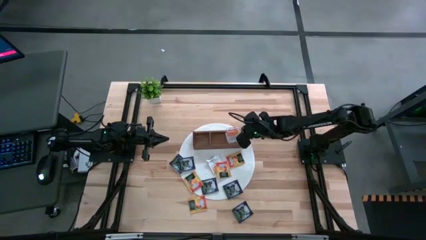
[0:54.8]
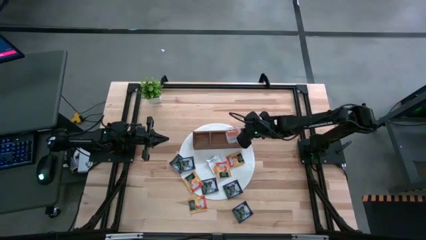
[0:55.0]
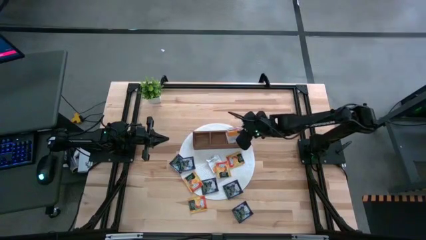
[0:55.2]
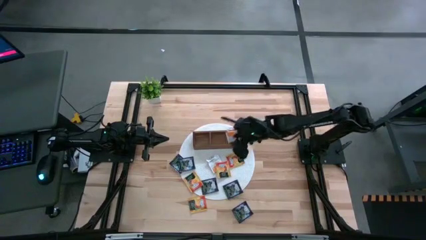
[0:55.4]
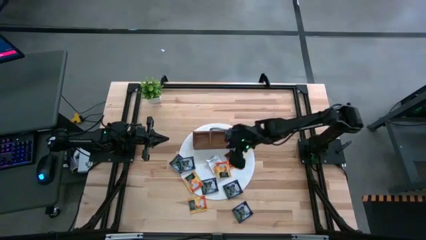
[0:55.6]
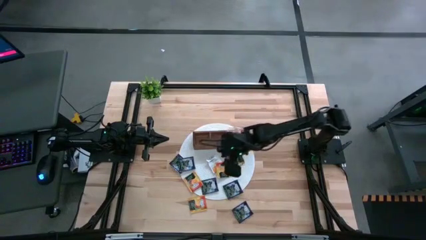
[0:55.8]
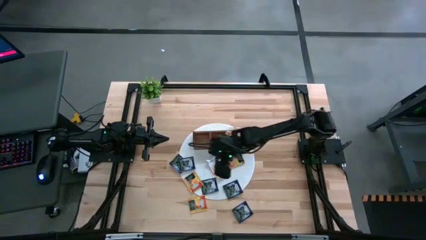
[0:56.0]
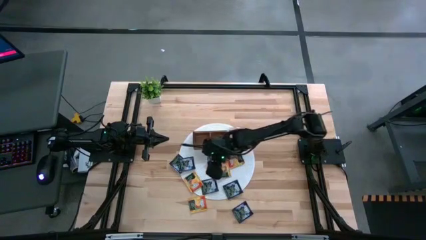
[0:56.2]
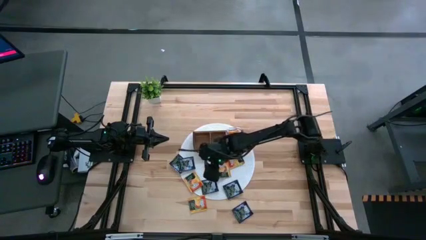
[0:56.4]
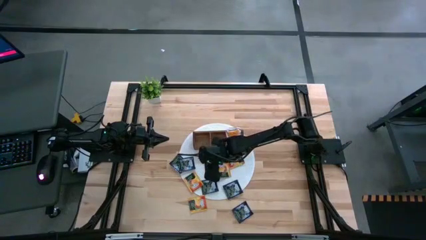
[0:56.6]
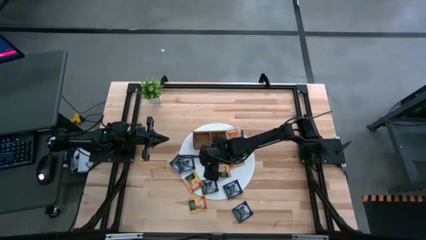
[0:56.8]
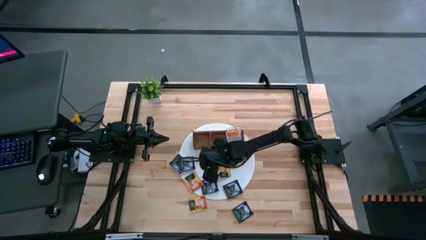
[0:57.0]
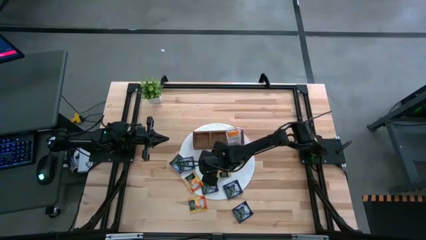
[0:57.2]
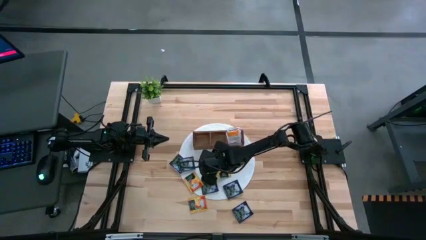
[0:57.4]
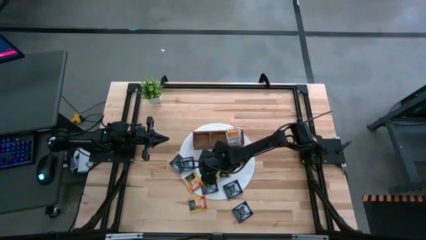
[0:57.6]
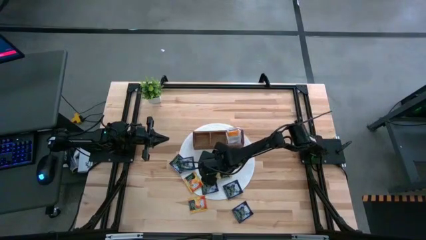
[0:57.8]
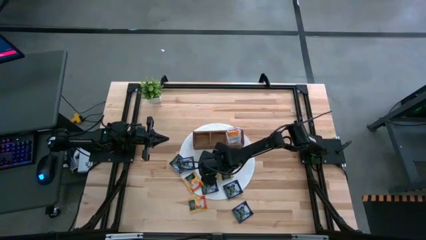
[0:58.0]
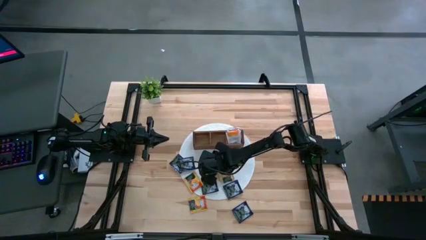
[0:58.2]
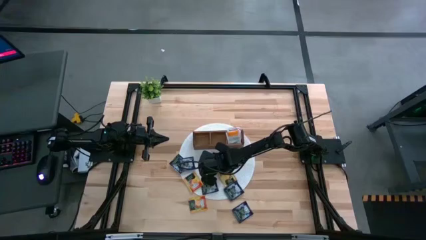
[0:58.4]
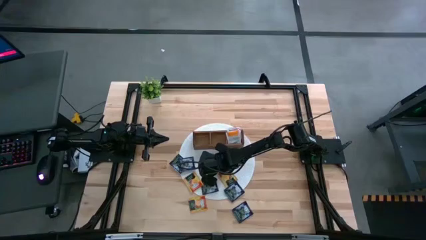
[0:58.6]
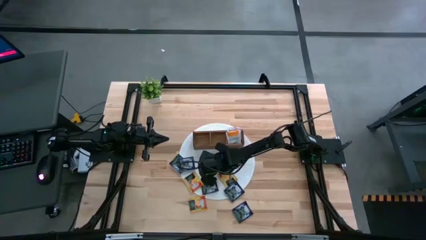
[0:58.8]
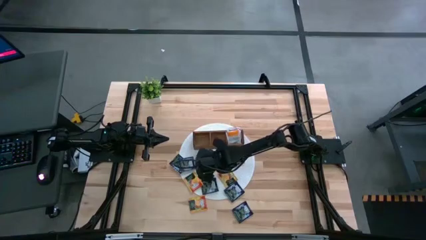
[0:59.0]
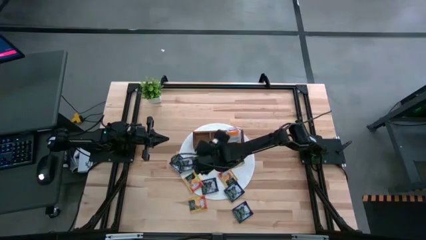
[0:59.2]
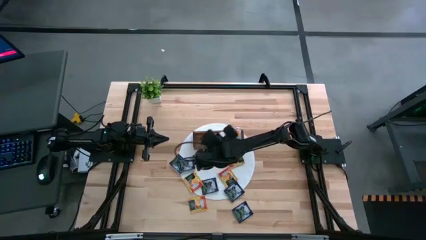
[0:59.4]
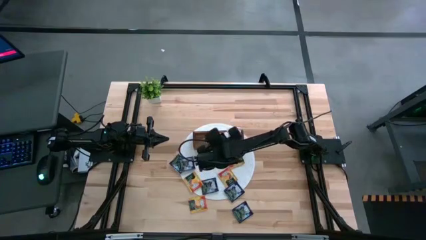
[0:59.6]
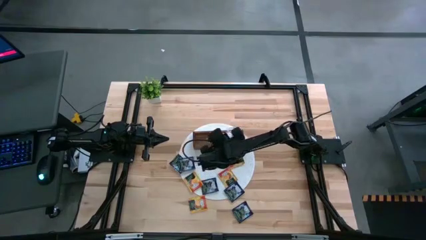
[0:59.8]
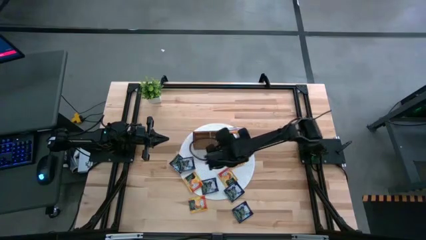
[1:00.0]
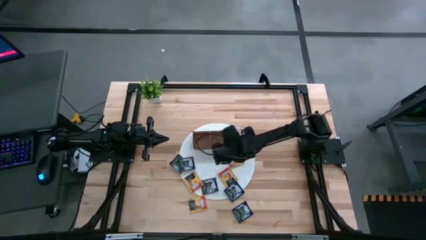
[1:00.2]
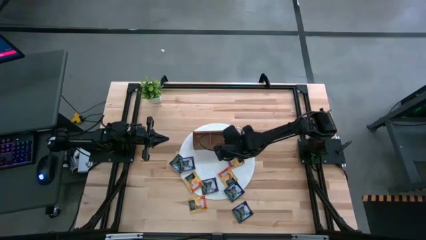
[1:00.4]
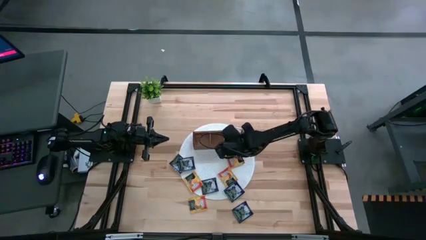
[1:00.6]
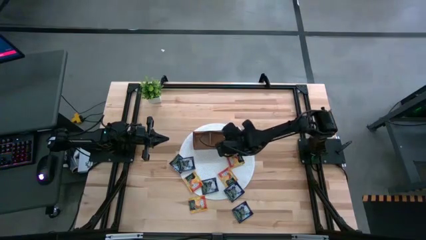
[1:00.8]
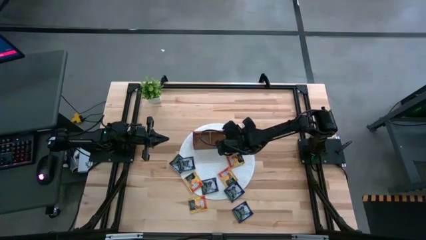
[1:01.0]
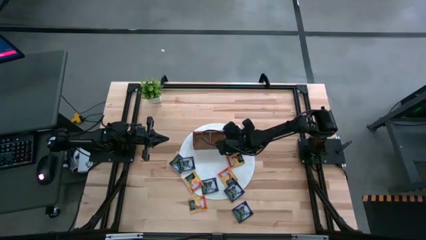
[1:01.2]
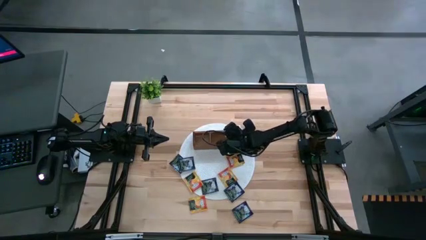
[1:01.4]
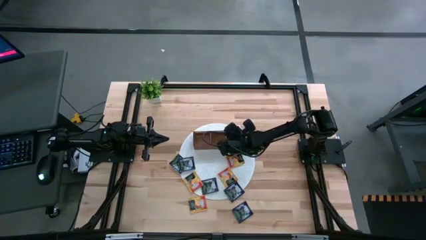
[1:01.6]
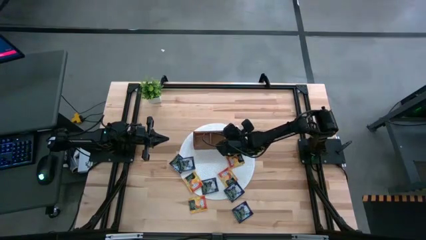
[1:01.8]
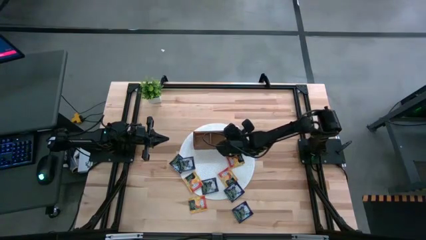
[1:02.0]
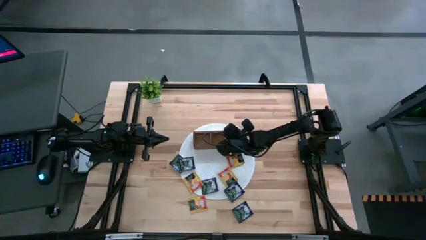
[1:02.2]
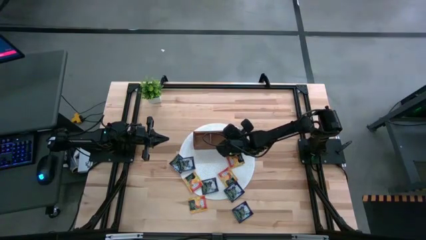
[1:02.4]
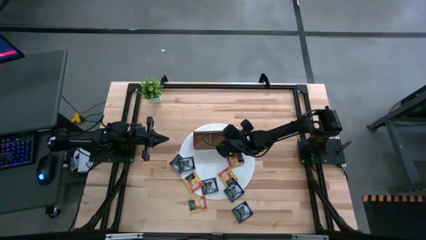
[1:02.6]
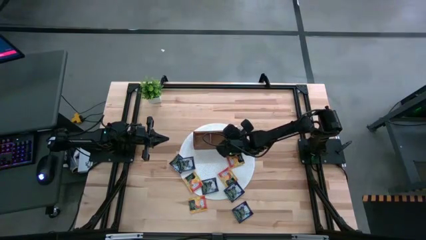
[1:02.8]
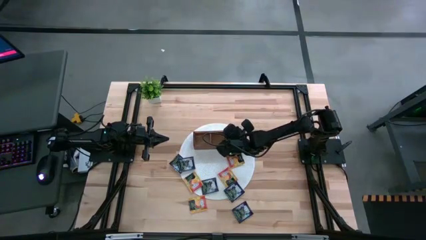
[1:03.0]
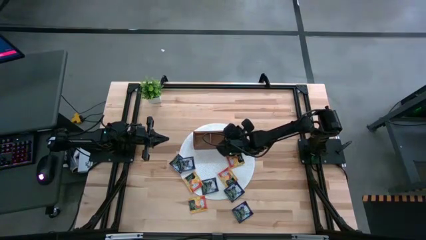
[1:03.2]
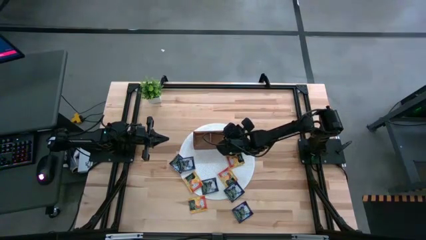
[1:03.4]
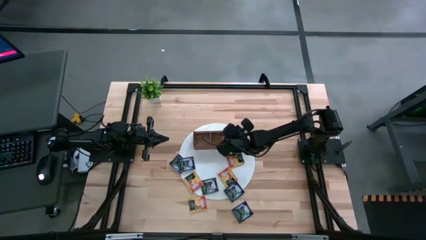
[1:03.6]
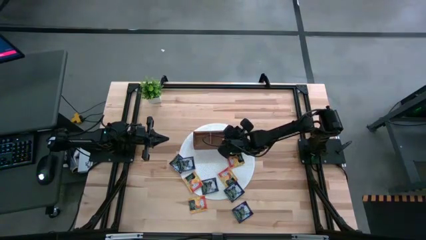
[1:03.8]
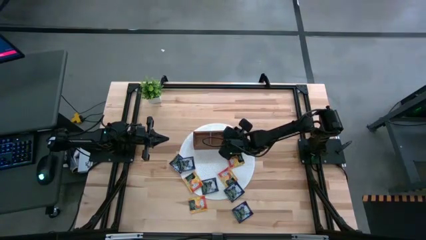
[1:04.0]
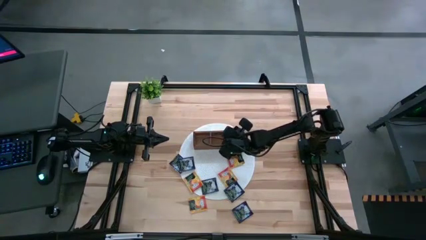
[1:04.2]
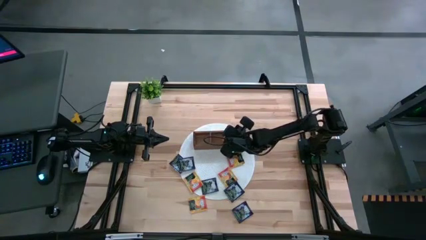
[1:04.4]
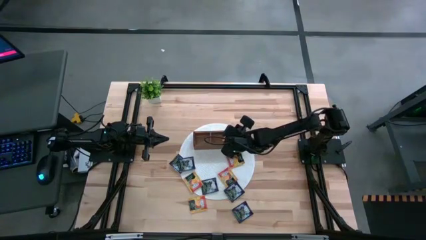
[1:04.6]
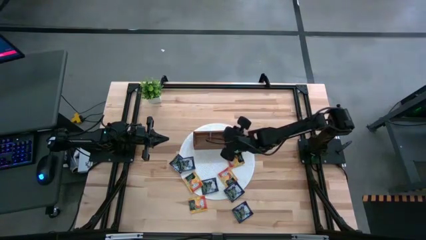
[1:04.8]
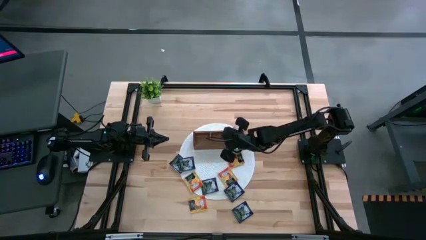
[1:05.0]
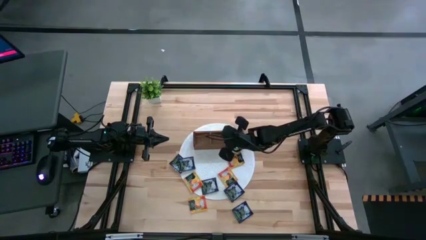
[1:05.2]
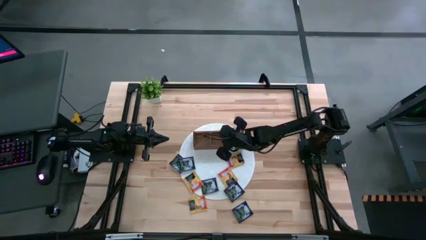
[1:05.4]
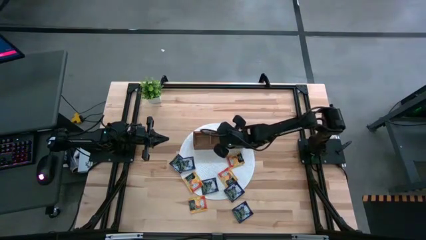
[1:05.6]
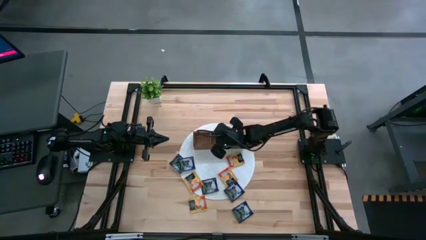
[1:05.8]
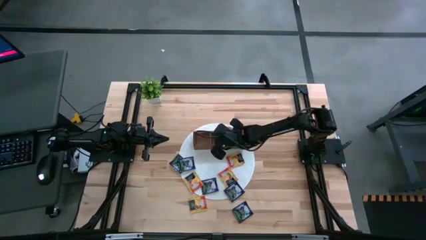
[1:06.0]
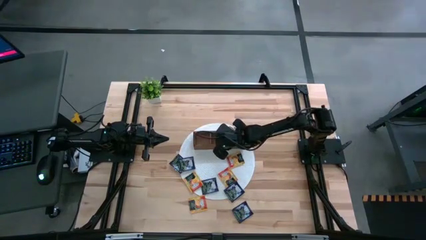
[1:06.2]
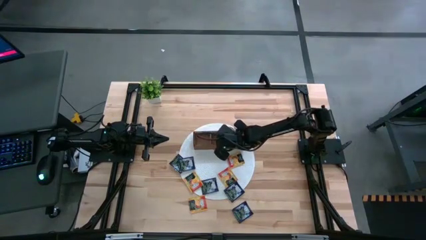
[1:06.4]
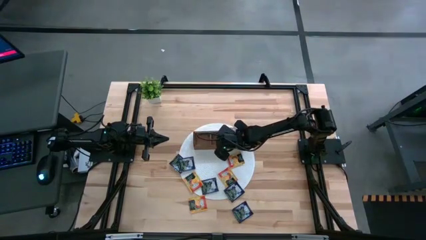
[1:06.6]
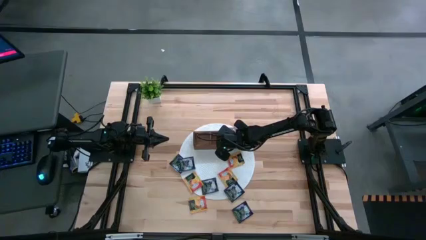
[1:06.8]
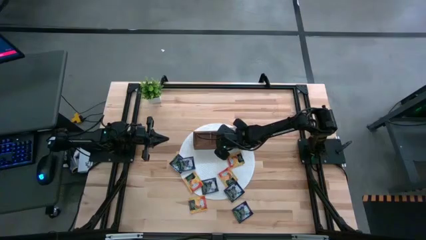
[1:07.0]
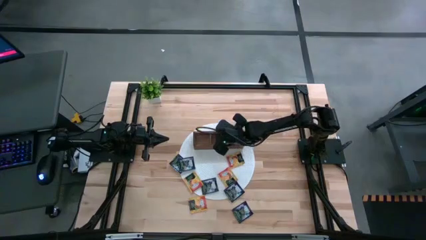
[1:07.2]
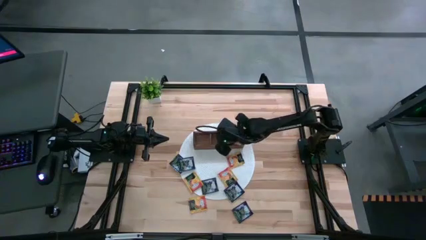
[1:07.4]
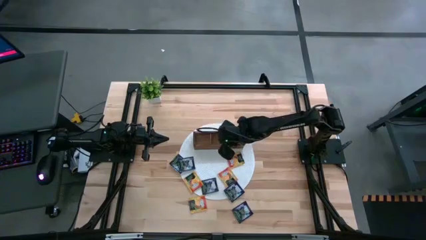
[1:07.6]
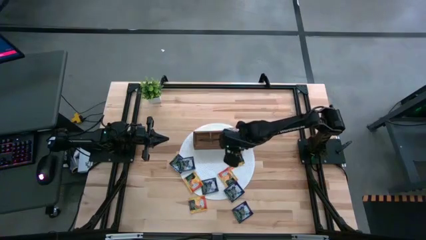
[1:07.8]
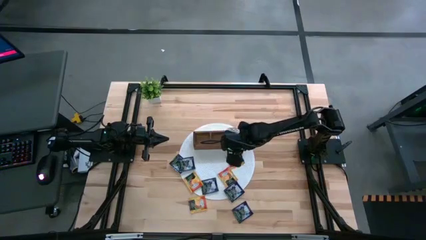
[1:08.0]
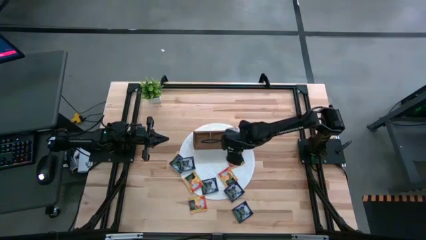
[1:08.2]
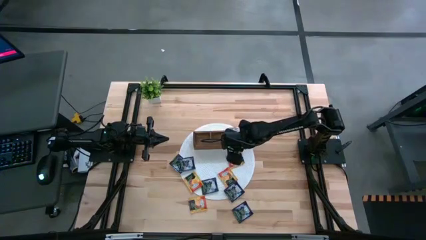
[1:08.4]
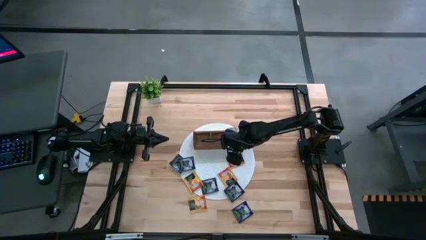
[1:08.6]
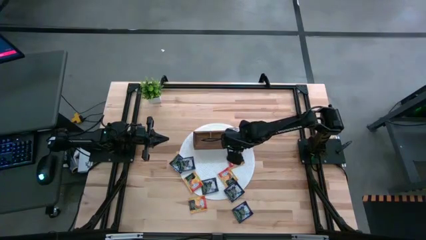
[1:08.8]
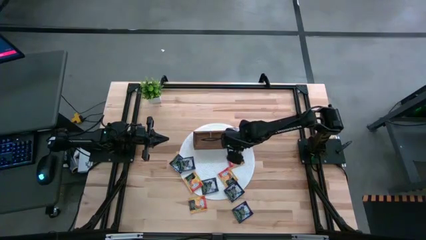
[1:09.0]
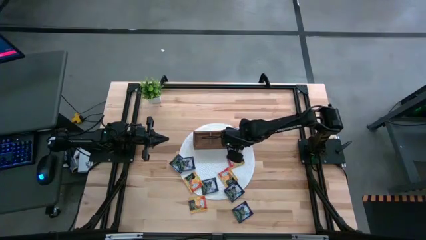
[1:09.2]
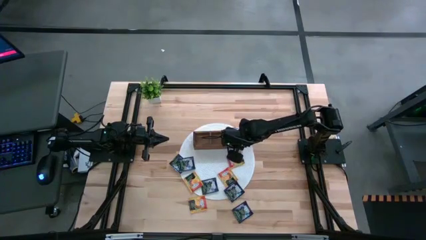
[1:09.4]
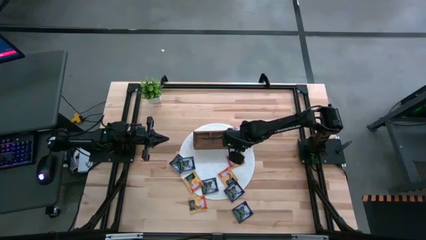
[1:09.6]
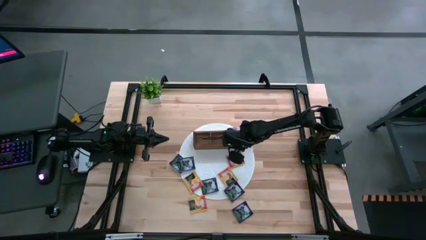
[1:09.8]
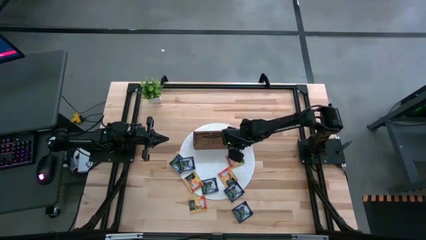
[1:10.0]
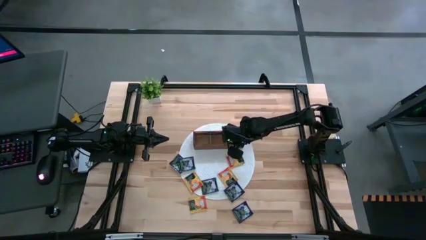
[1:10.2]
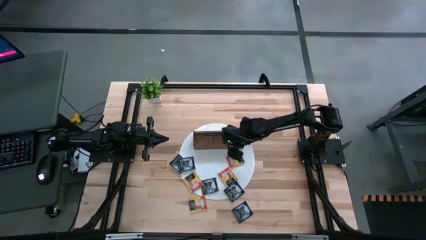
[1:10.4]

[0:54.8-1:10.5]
Task: Pick & Place Tea
Put the white tea bag into the right section of the wooden organizer
